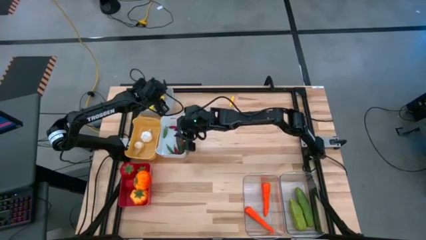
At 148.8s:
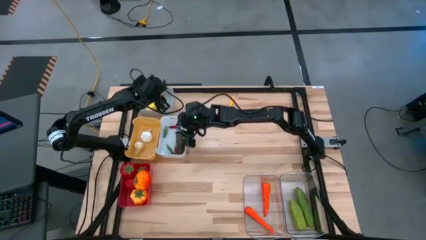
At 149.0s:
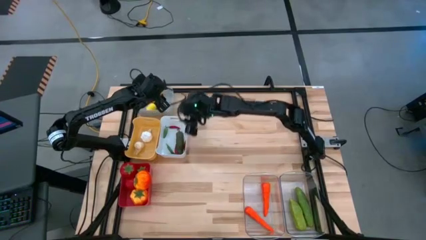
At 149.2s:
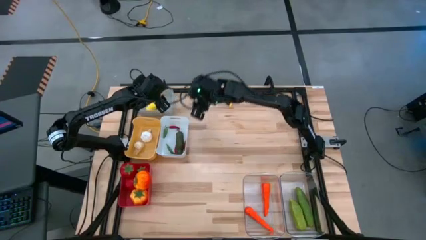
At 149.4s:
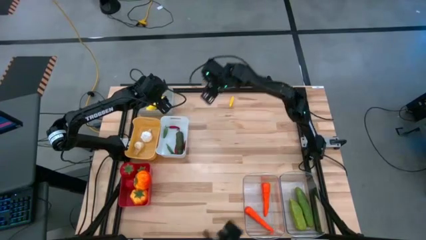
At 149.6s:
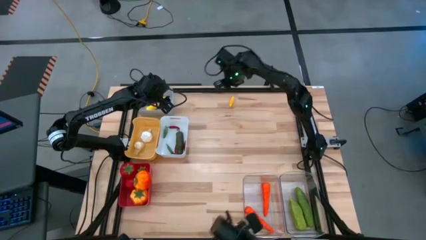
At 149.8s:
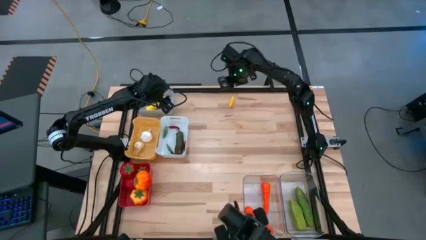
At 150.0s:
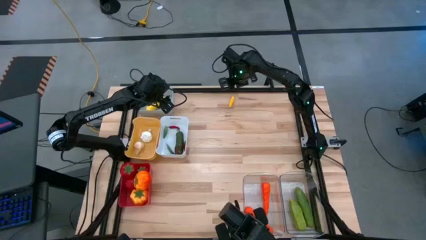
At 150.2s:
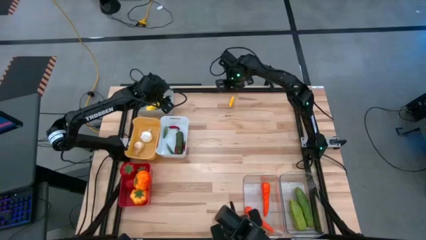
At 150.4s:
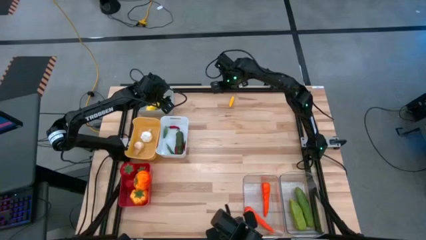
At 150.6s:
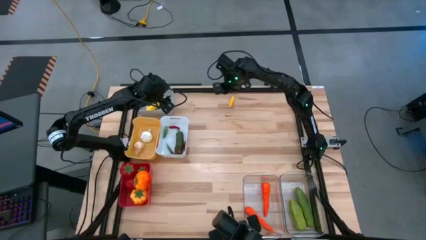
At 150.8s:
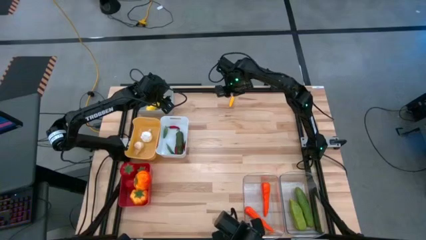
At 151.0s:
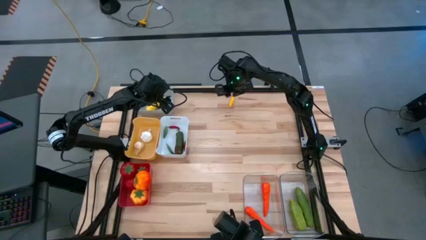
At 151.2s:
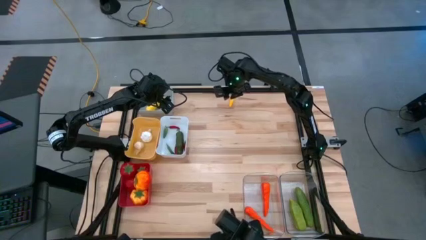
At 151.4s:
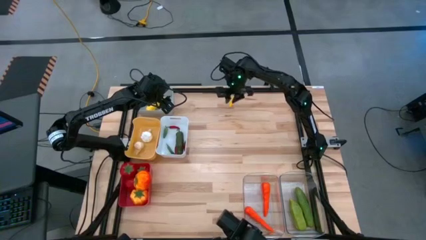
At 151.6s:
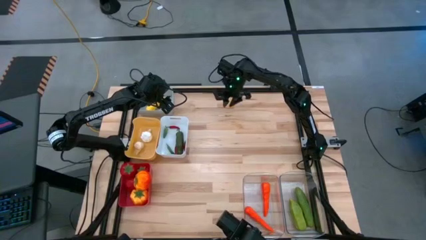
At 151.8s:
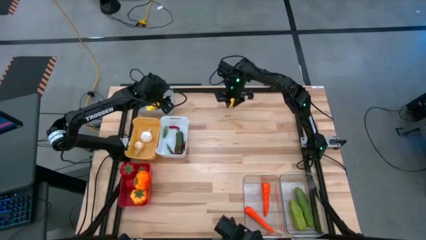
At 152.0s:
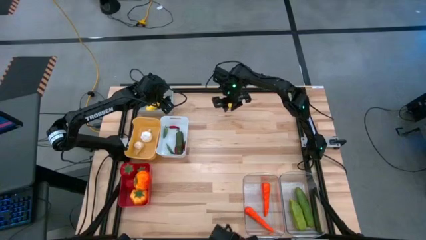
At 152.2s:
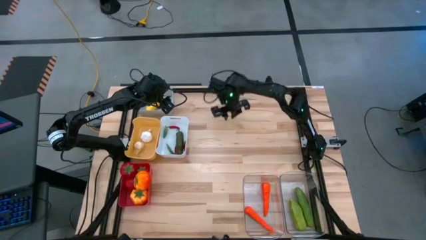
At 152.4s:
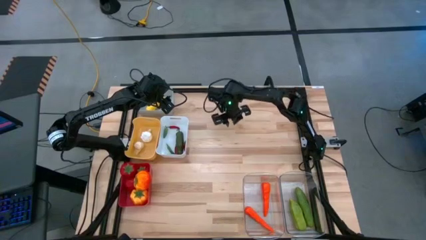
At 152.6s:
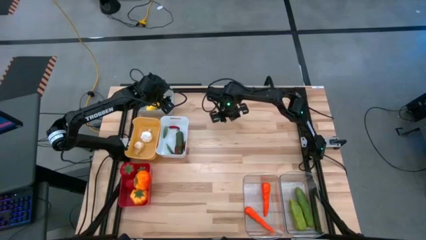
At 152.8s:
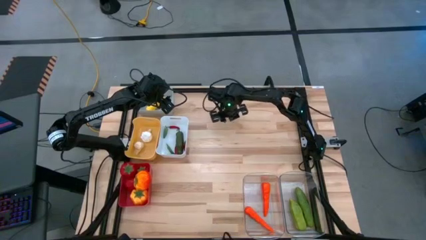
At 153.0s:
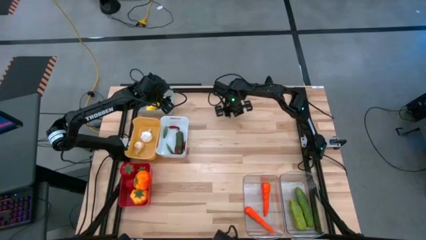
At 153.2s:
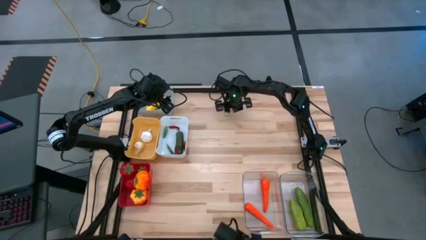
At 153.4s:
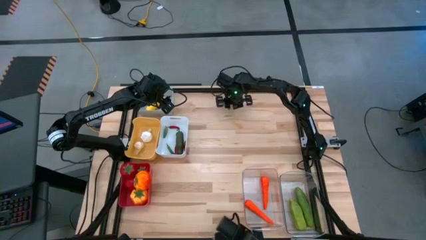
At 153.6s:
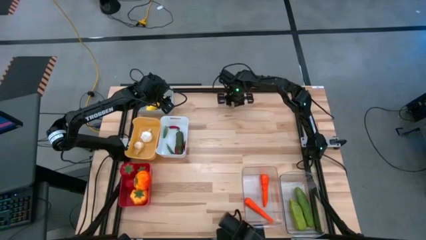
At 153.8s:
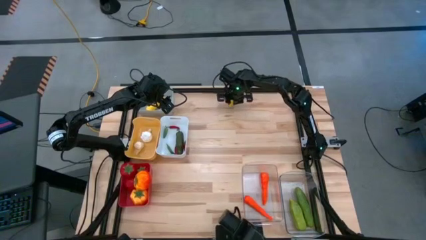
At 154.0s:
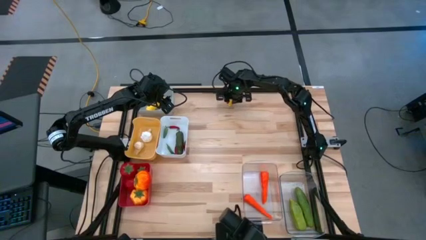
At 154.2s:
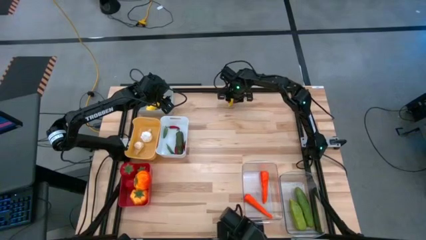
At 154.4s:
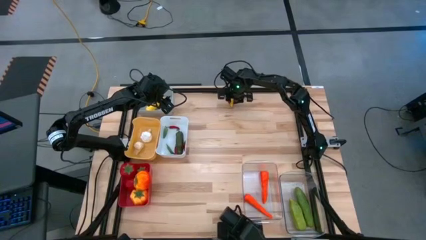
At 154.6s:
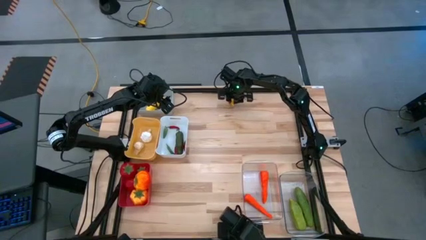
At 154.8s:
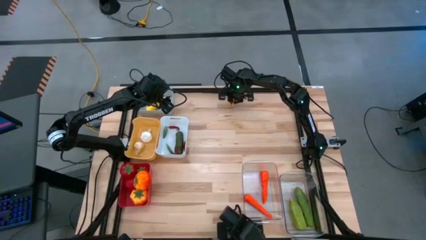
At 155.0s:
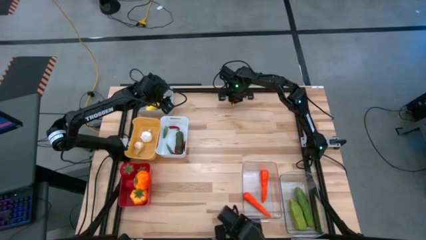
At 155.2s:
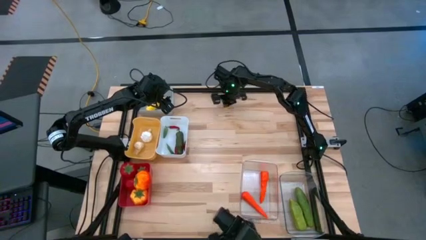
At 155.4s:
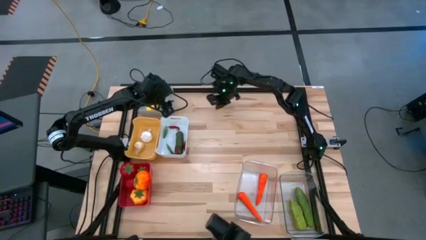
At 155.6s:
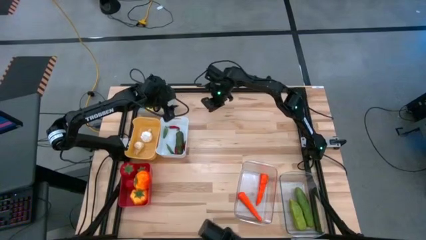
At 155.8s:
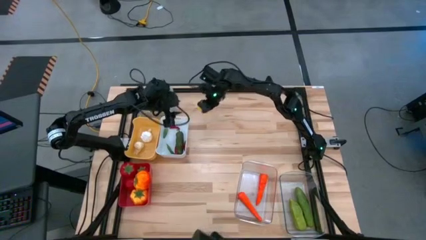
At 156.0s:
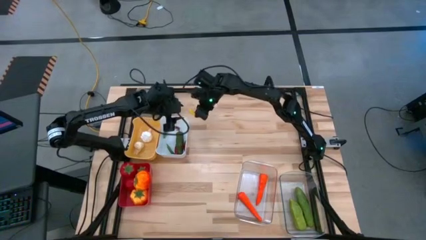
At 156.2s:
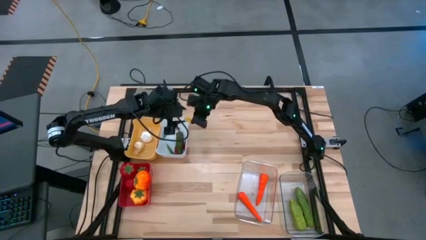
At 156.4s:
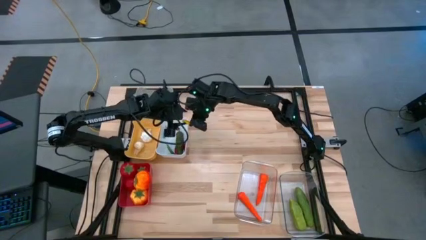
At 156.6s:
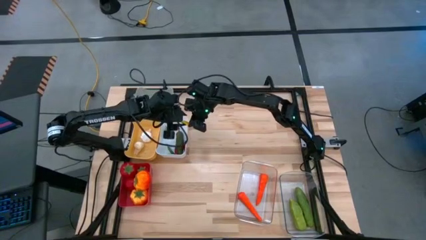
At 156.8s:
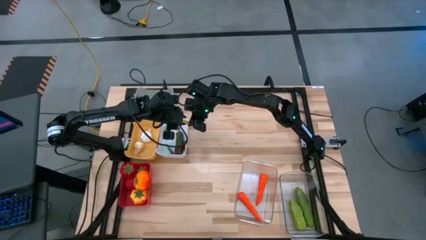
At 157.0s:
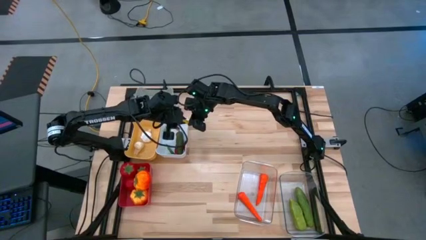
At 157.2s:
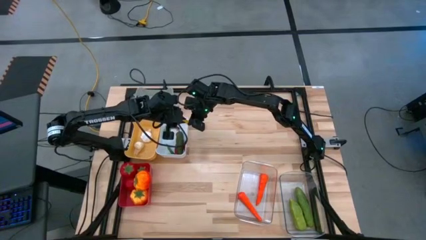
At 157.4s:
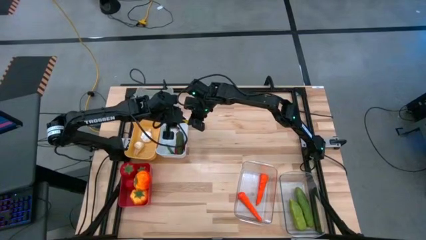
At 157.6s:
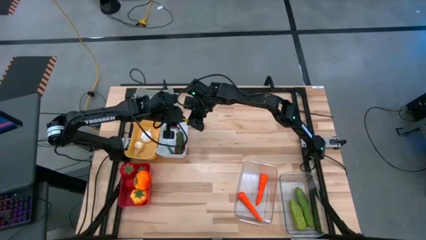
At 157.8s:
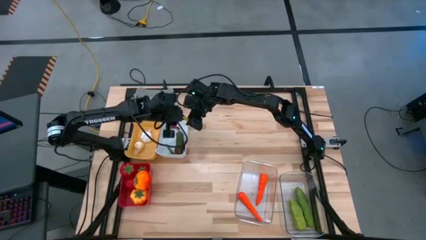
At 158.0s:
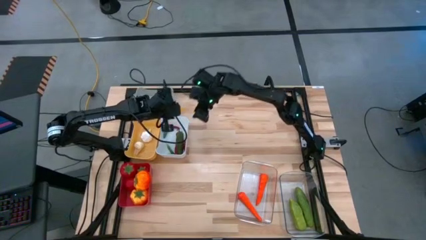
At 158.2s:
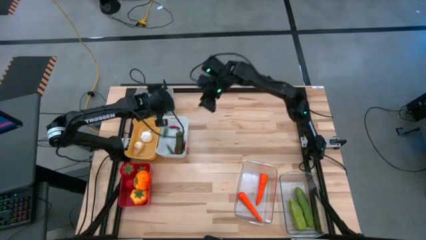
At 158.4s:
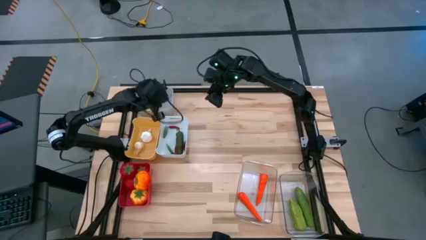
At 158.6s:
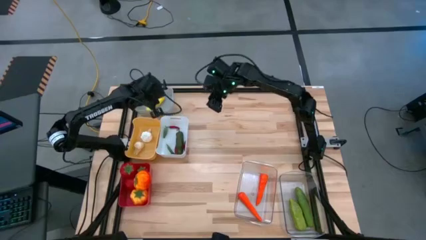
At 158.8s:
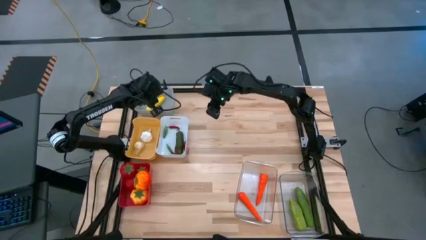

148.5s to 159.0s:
Task: Sort produce into baskets
Put the small yellow corn into the gray bin

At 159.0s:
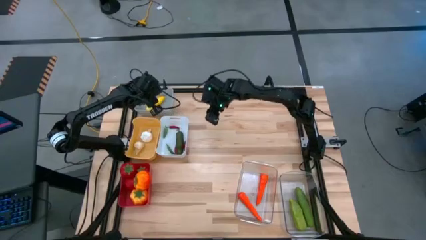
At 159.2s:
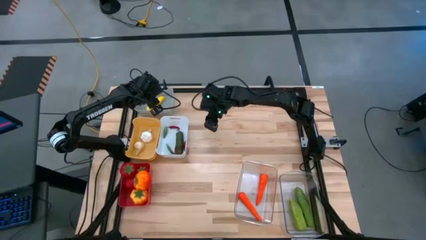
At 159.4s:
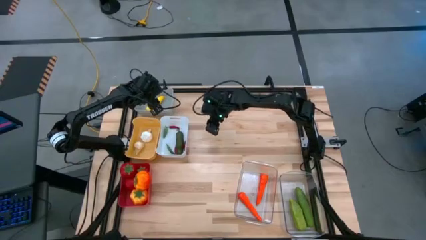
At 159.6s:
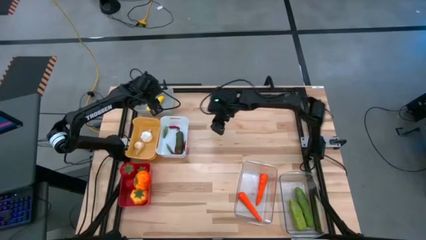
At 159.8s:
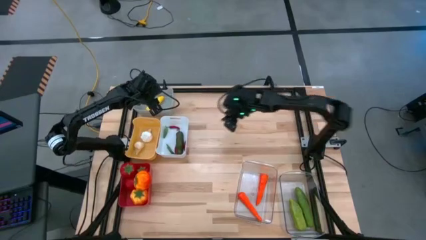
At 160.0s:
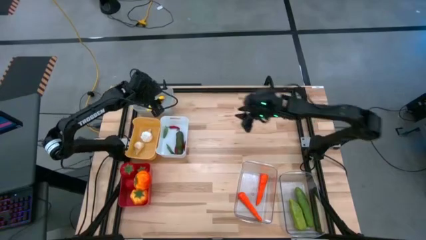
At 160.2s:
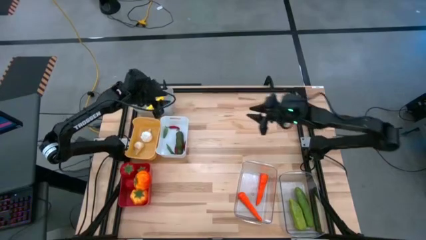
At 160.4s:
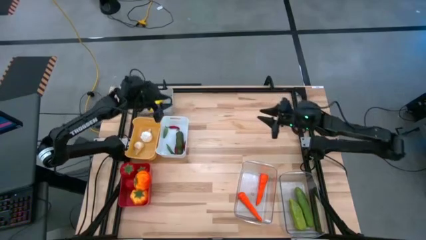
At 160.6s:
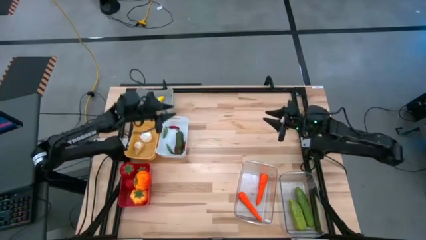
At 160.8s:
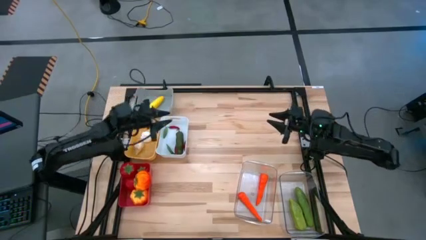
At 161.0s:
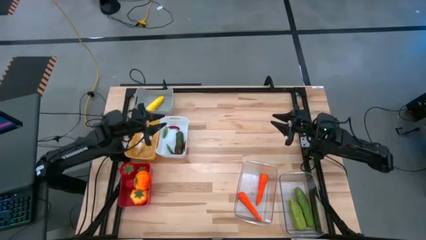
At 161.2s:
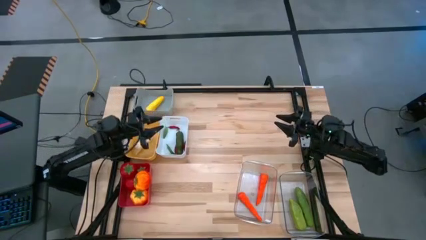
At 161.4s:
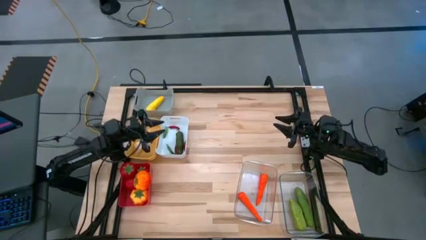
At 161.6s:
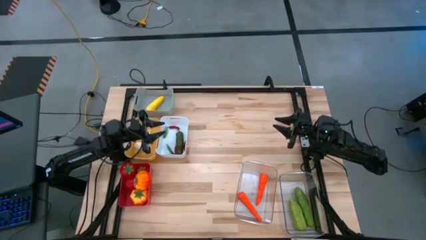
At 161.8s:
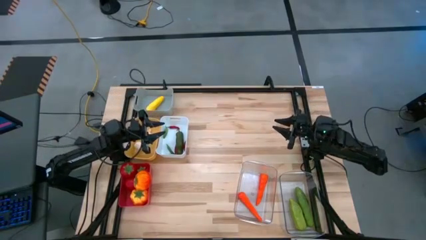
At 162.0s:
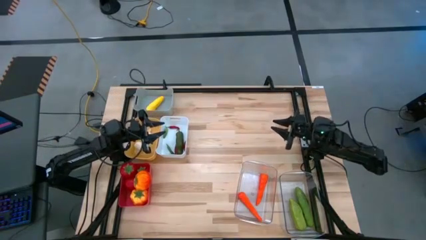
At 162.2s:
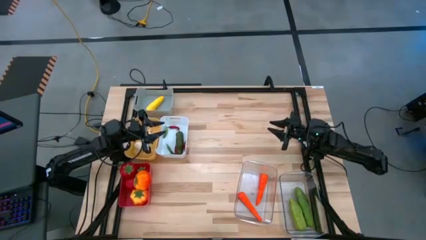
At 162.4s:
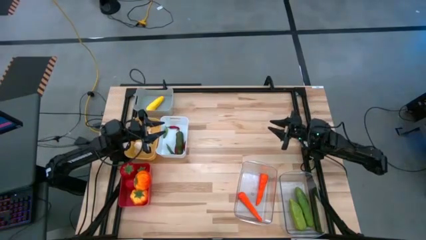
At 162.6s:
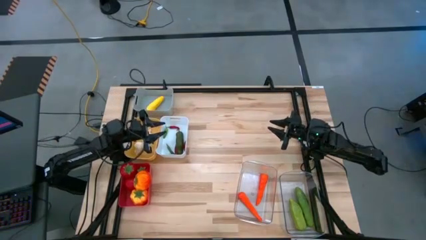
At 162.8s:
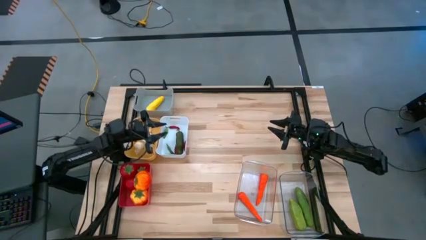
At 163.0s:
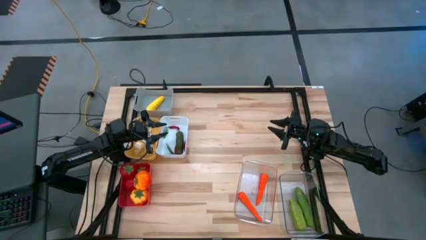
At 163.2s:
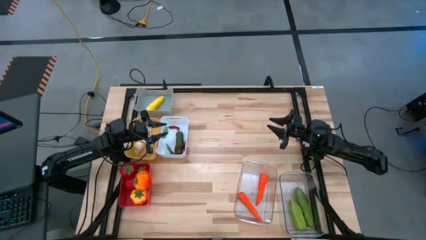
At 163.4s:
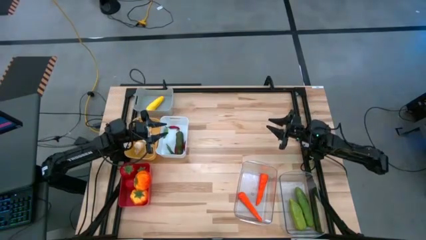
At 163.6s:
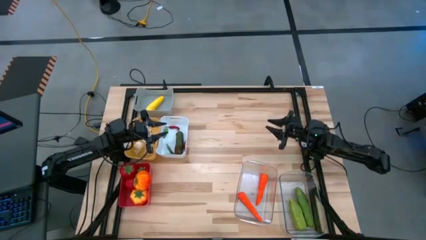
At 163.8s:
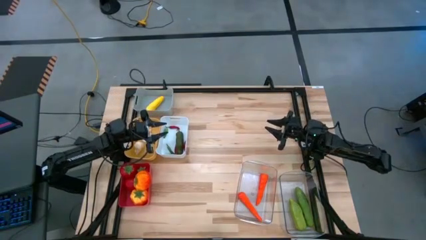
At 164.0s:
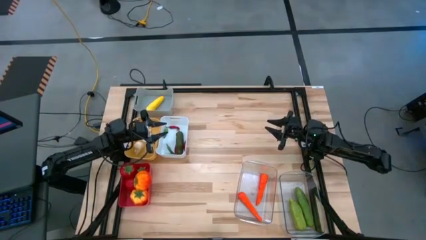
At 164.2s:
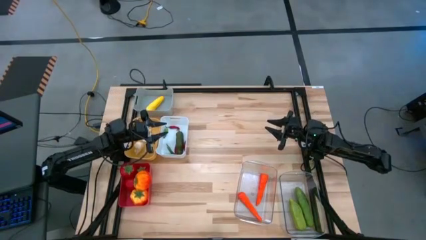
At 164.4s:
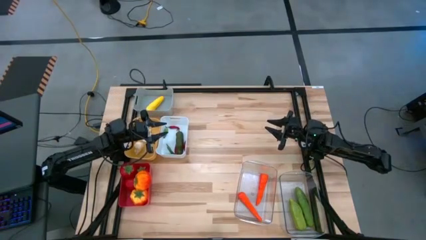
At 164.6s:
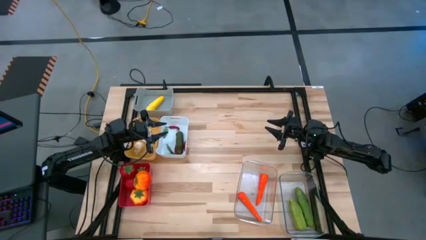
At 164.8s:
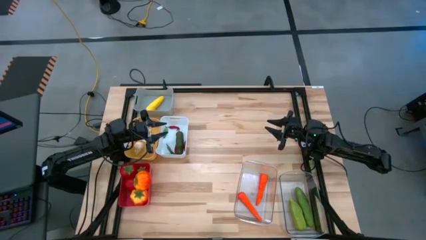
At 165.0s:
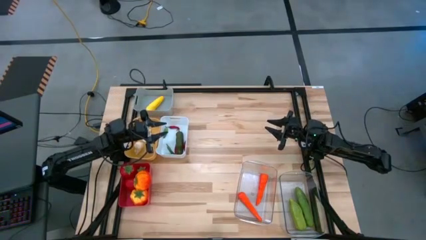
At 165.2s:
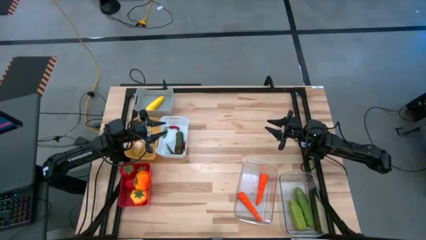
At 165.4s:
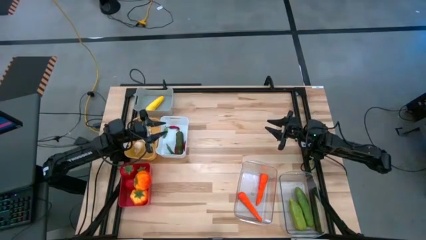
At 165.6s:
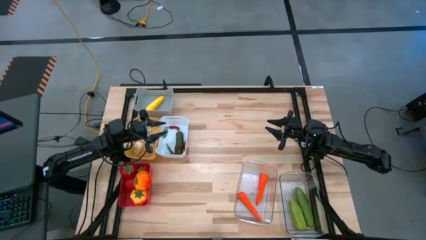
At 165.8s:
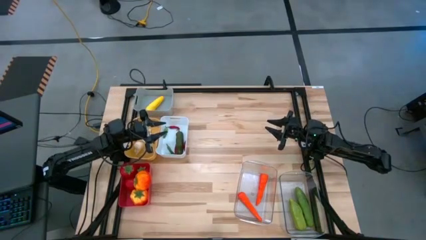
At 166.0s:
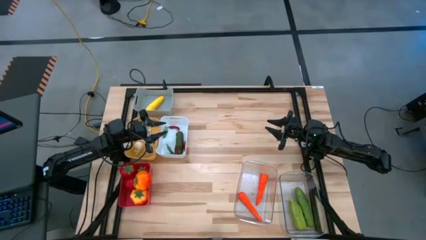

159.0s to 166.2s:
Return to Home Position
